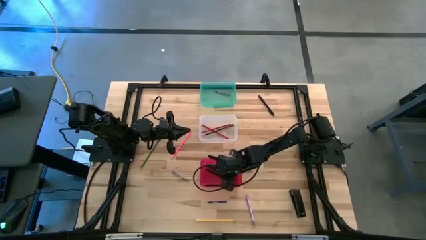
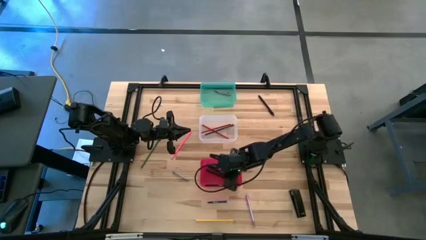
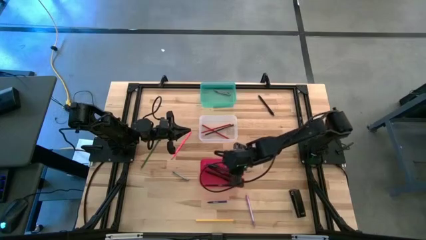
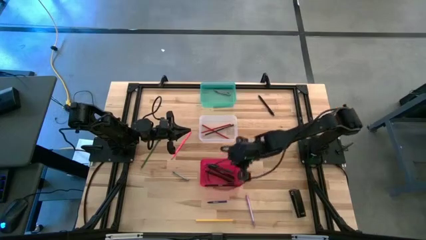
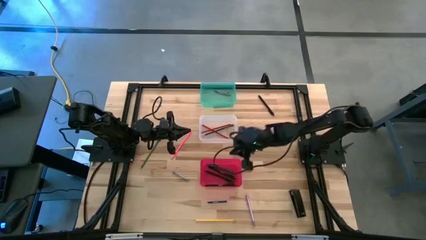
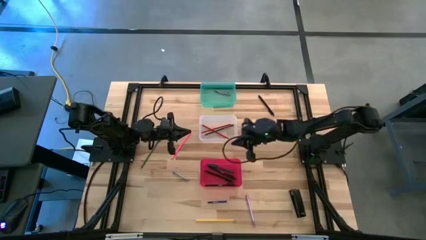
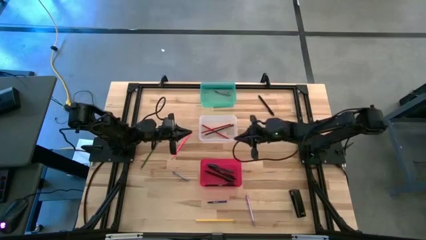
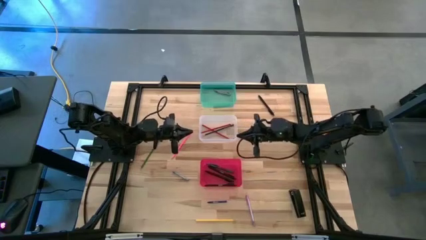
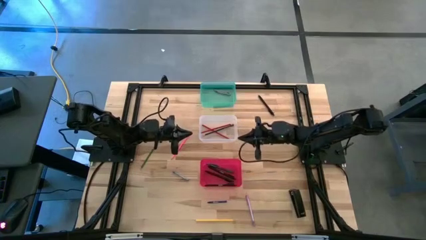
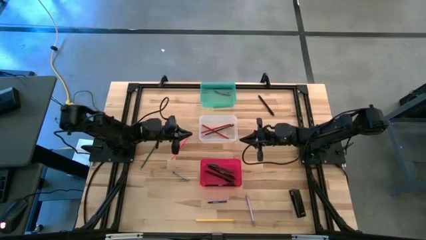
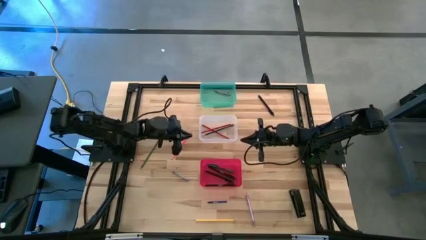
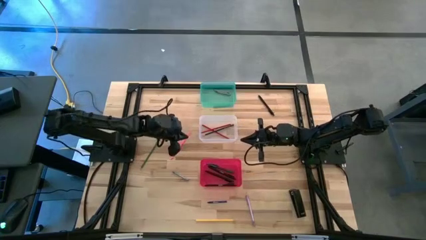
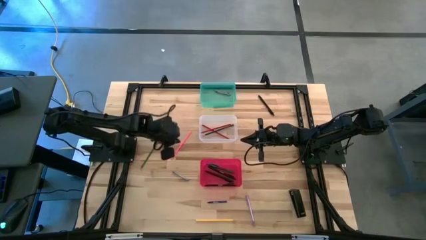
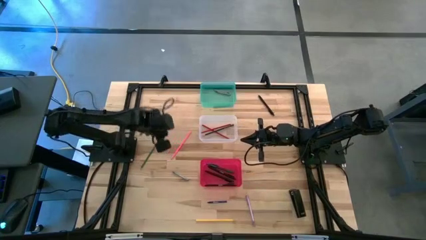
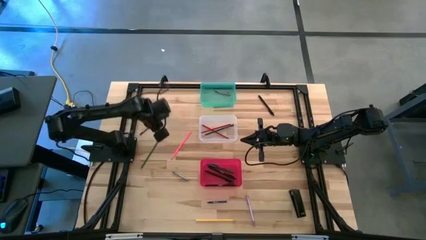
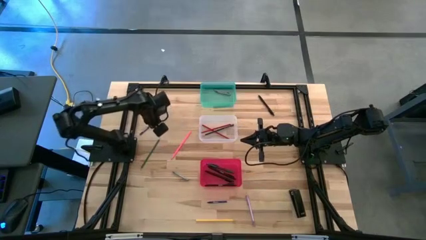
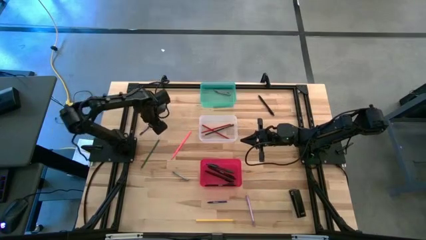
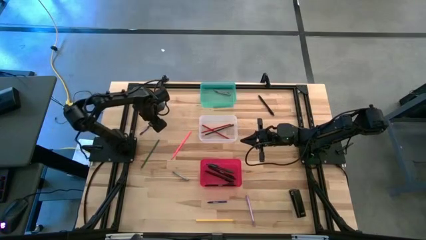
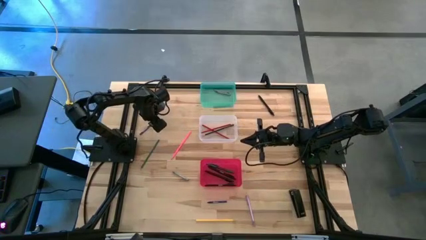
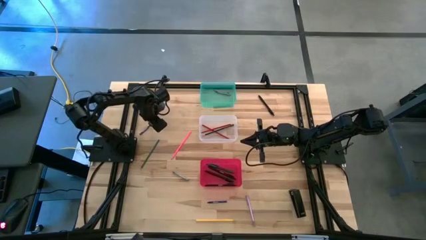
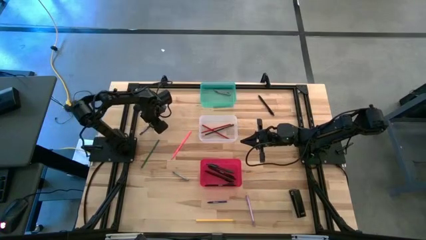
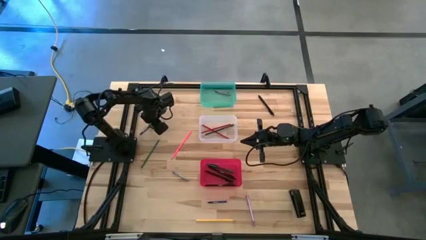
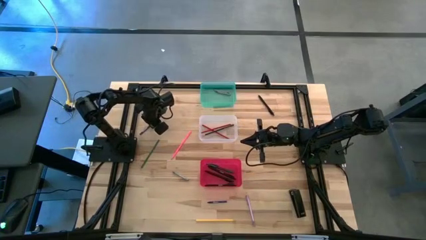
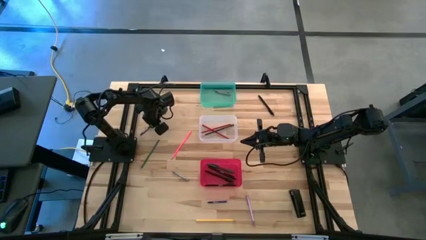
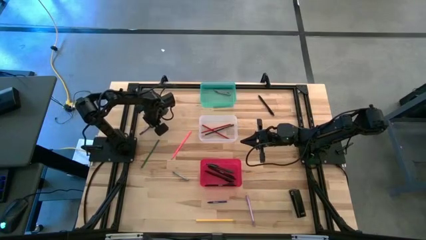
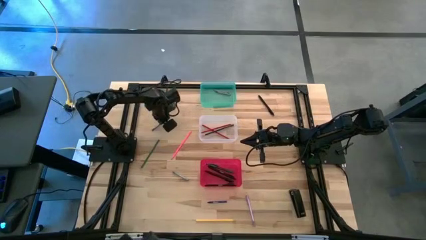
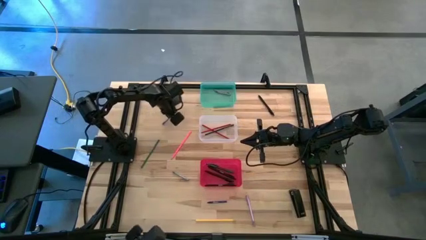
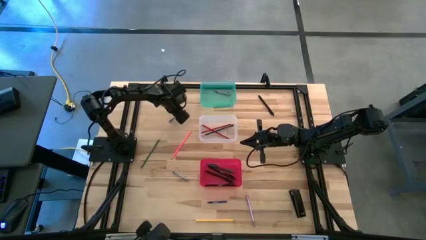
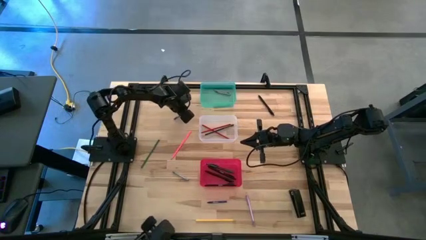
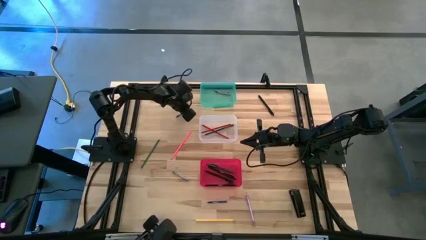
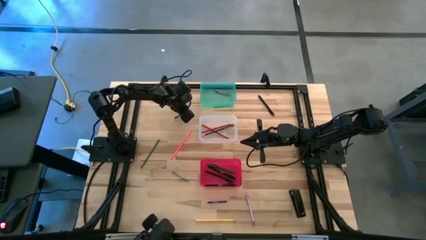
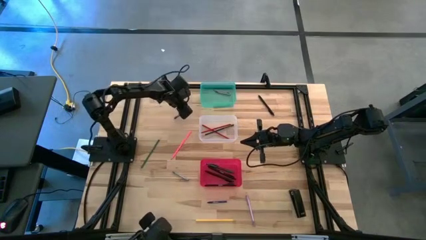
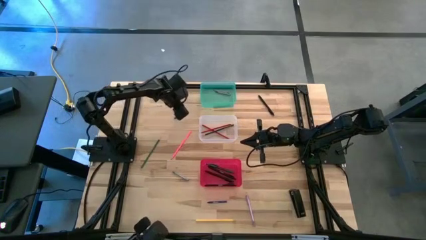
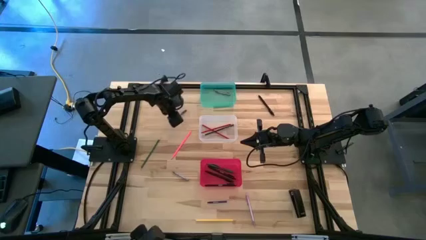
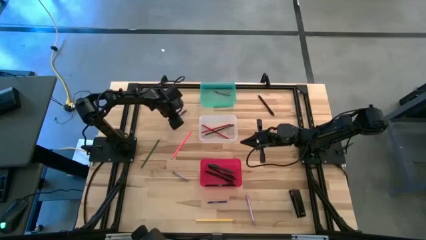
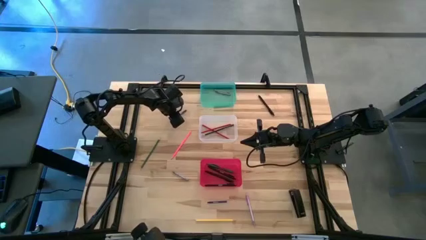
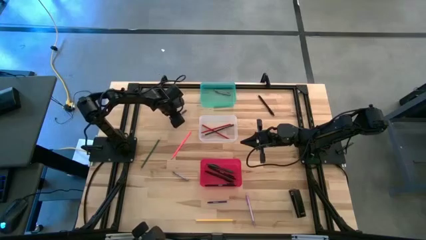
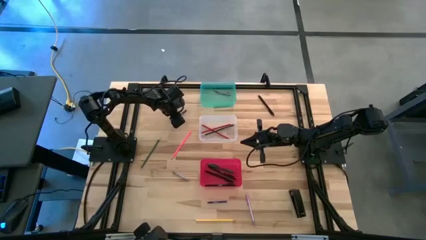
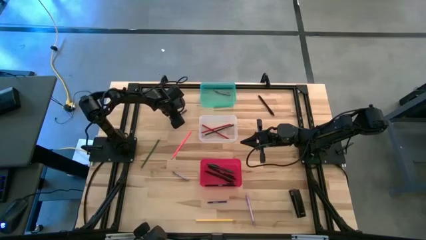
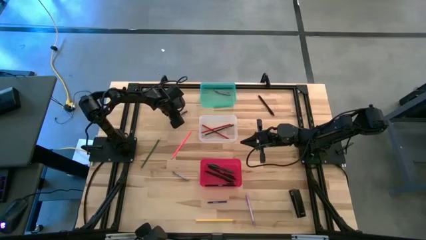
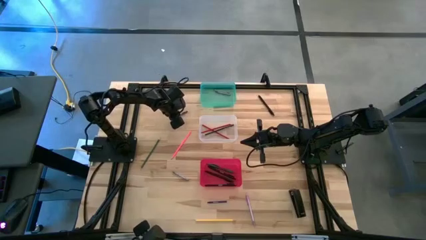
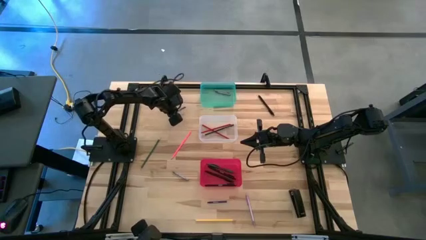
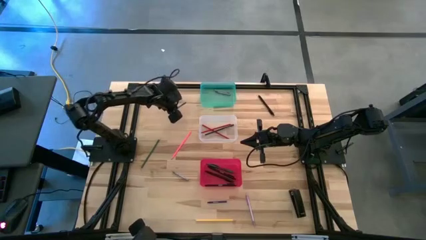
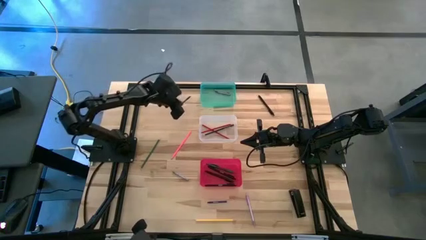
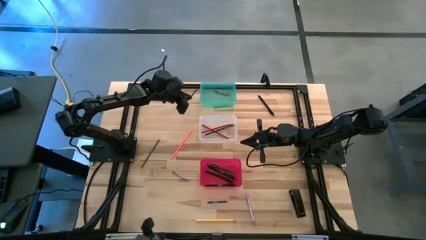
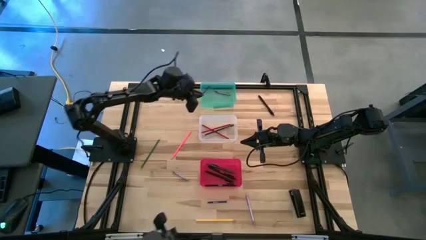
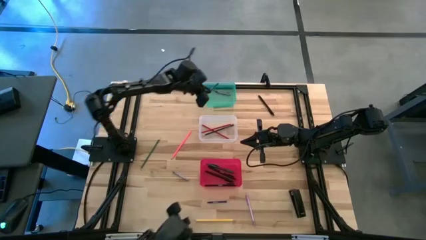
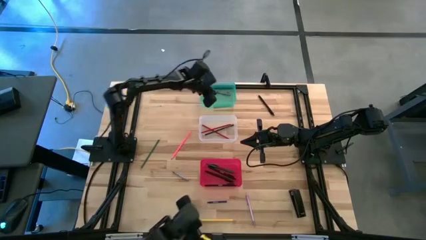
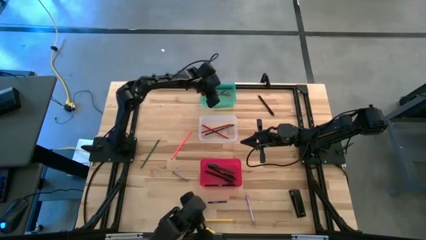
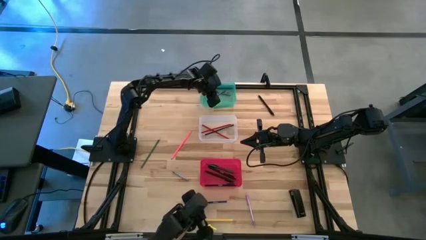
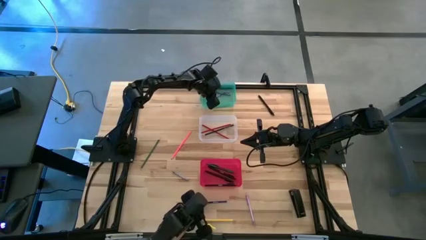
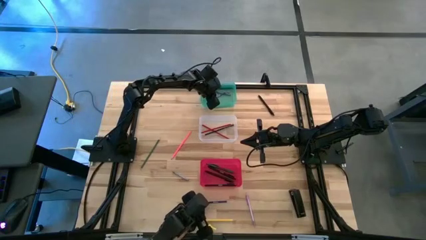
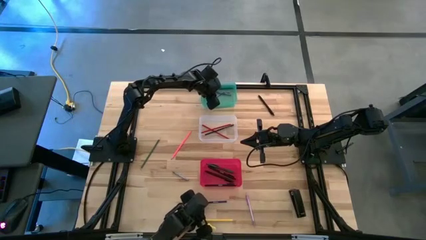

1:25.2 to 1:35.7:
Task: Sort crayons/erasers/pens/pencils in bins
Put the top blue crayon into the green bin

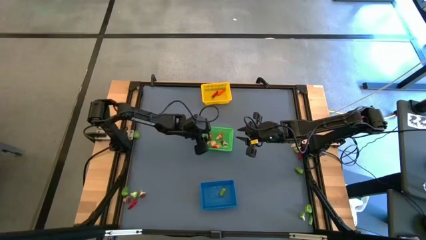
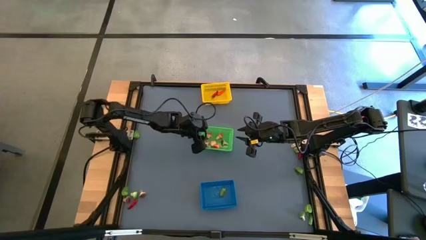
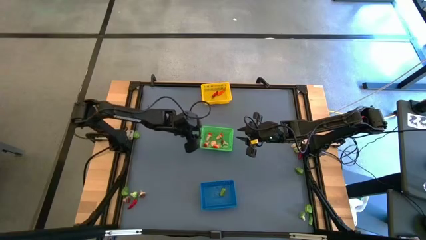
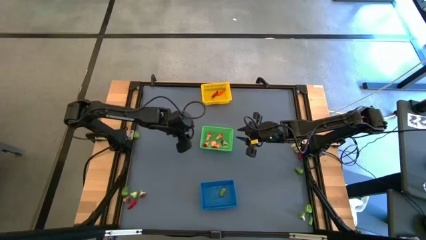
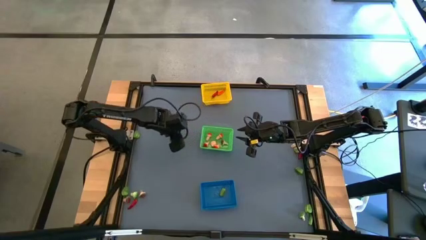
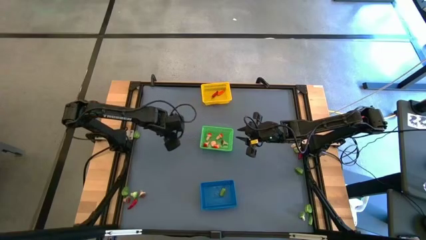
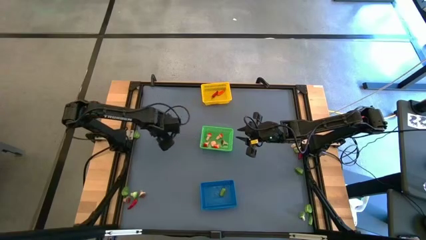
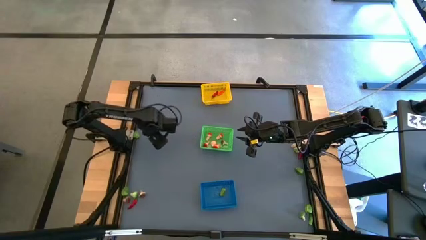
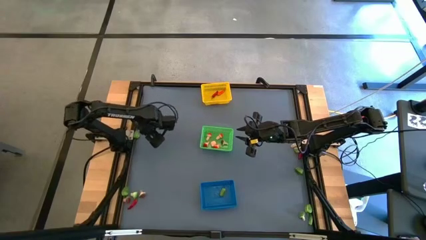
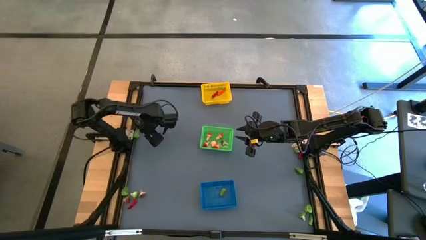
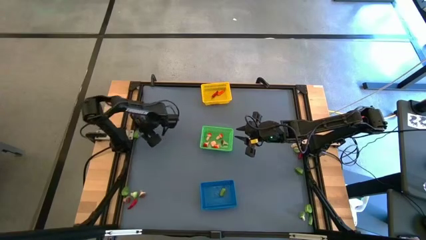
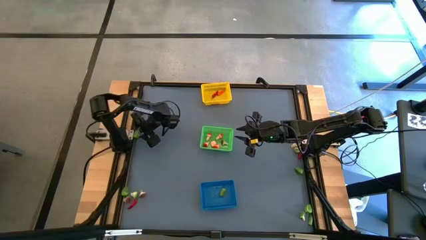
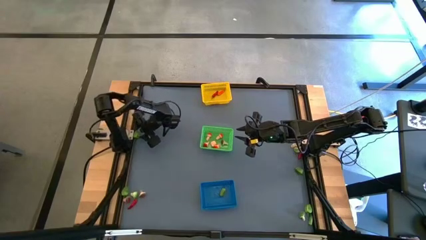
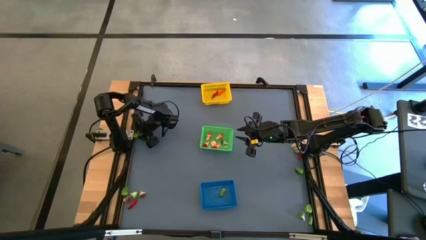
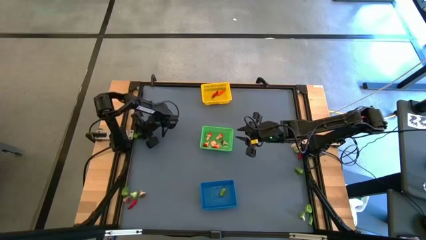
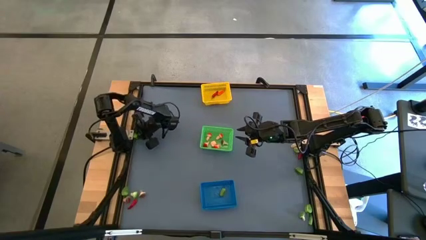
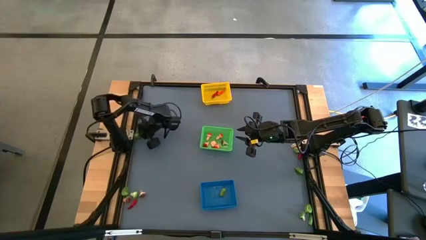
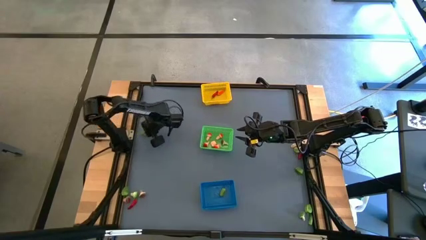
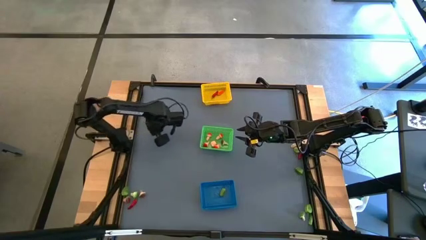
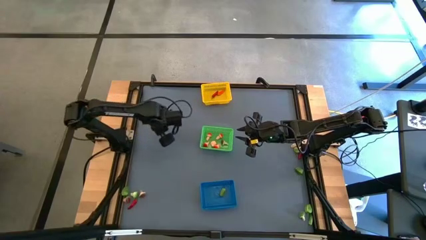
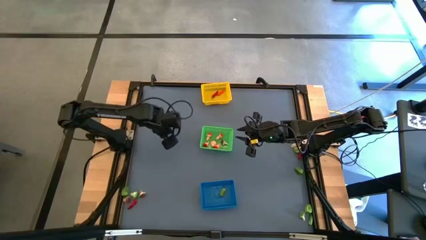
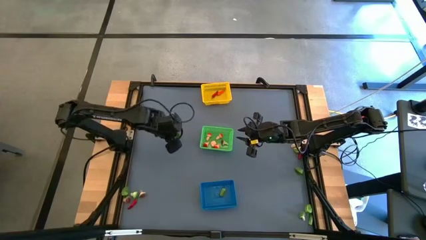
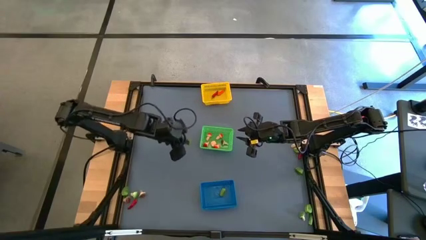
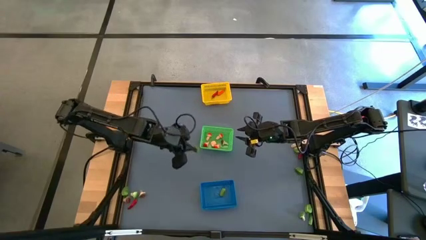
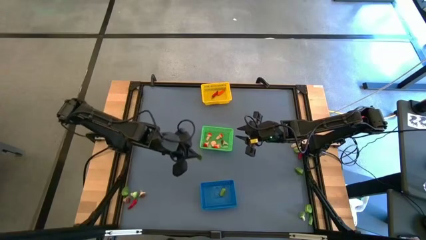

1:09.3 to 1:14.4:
Task: Sort produce into baskets
Put the green chili pepper into the blue bin

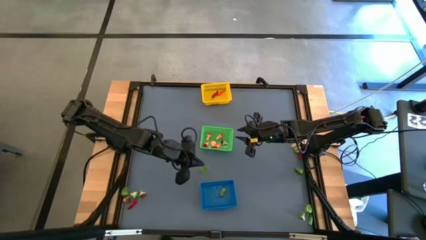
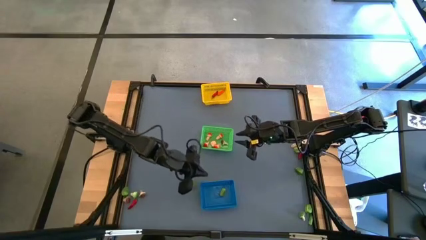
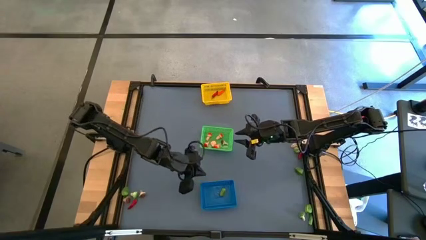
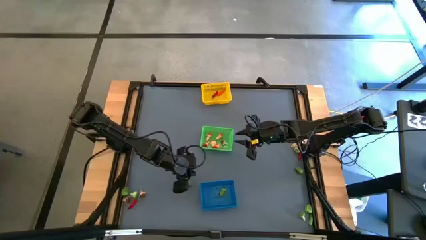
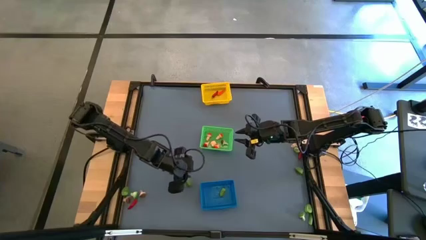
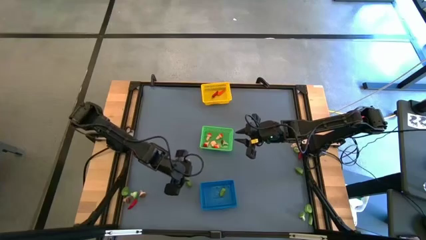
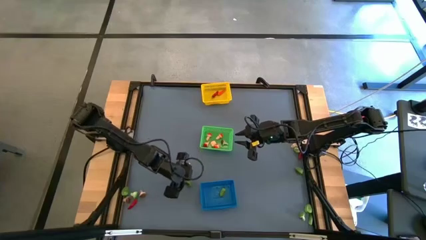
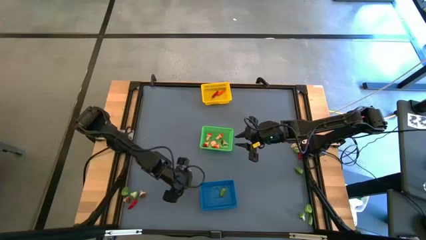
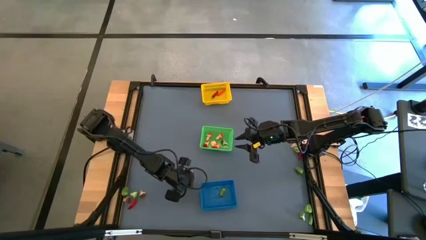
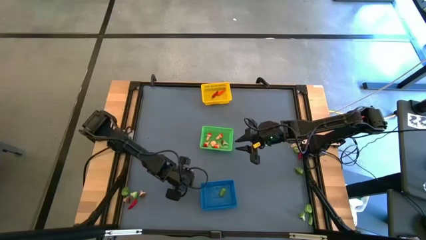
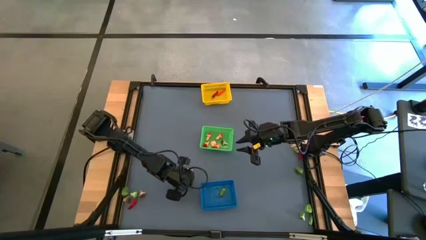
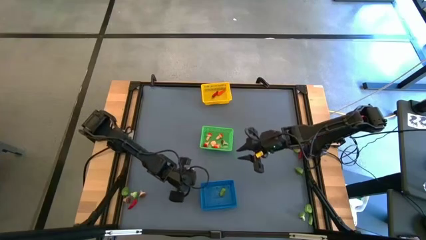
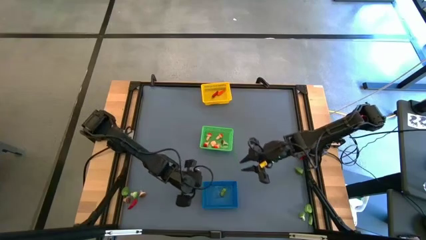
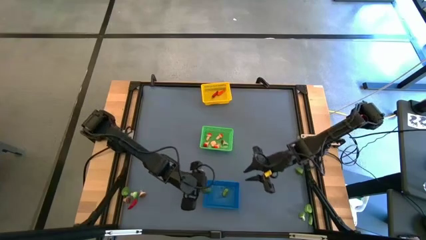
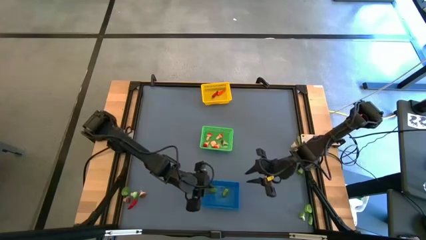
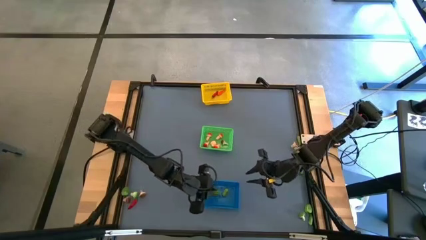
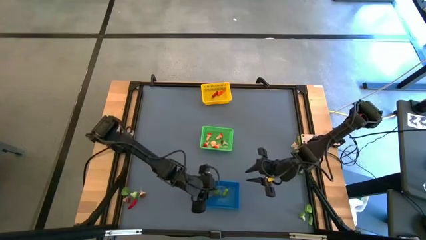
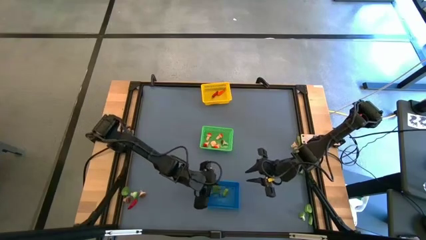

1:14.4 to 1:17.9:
Put the green chili pepper into the blue bin
